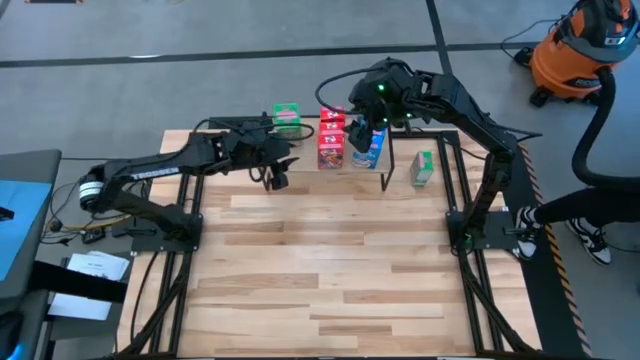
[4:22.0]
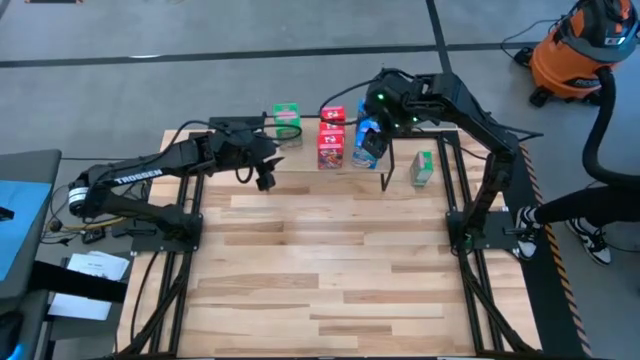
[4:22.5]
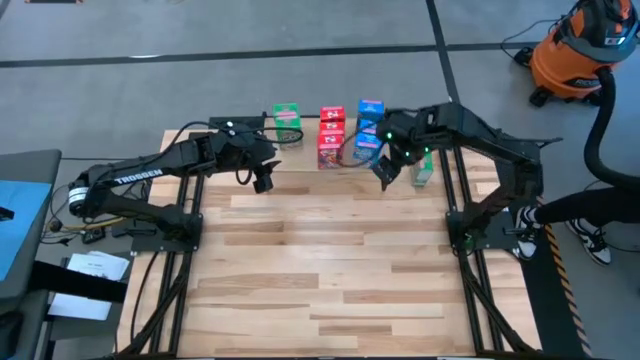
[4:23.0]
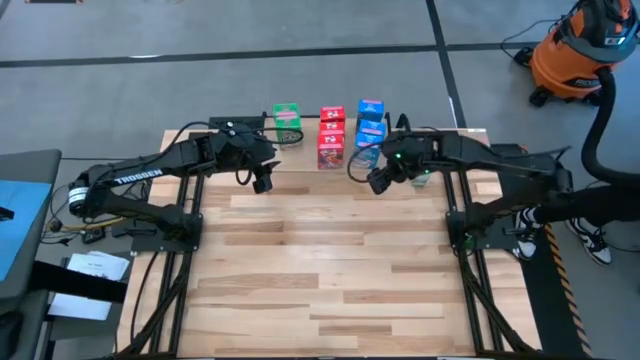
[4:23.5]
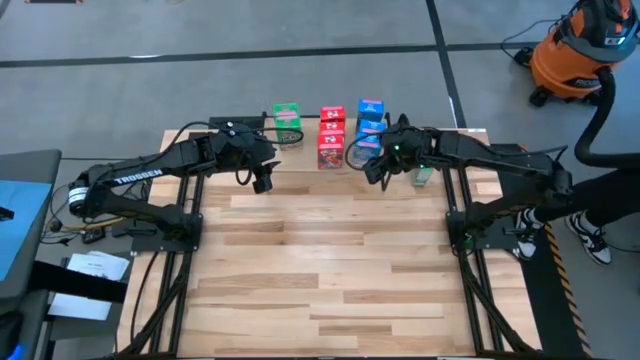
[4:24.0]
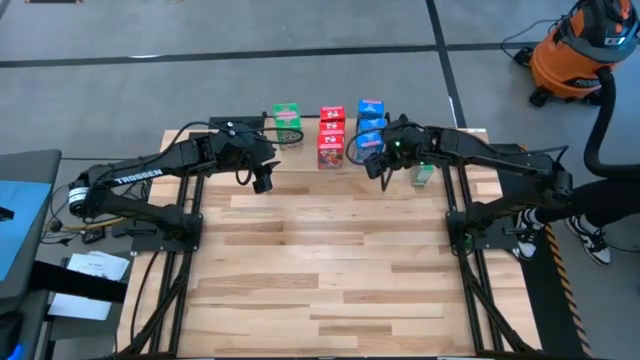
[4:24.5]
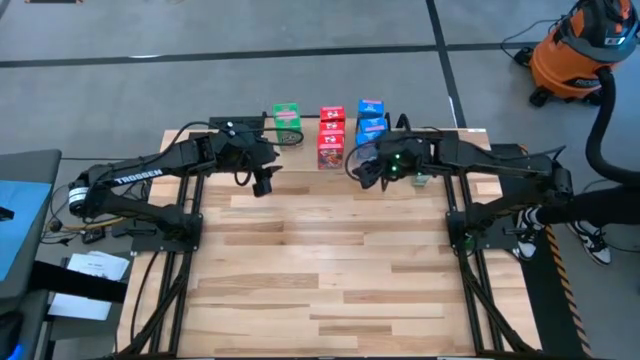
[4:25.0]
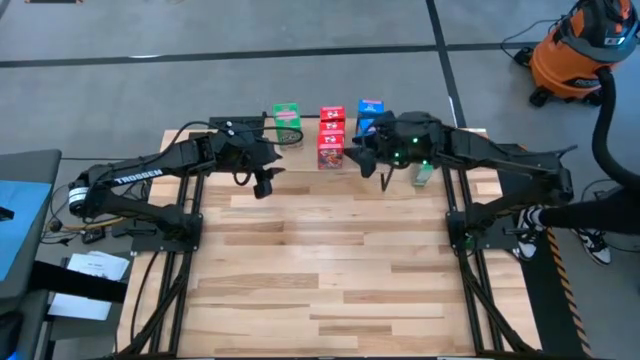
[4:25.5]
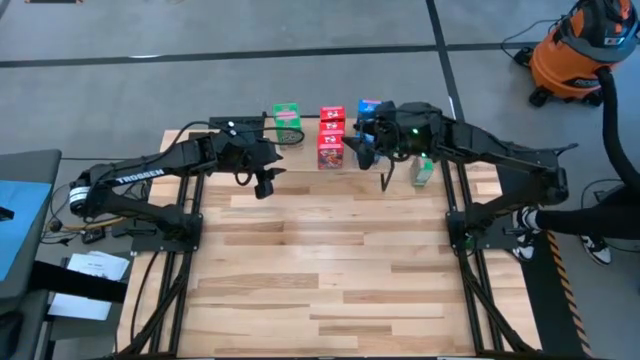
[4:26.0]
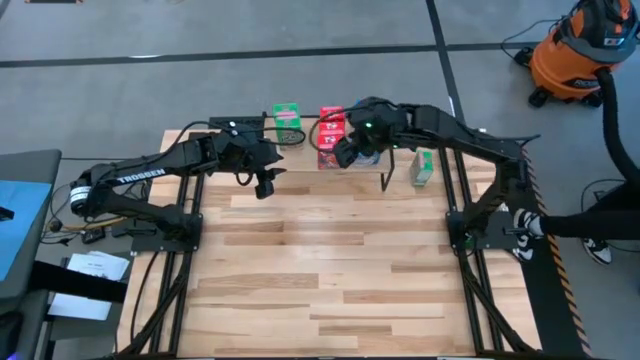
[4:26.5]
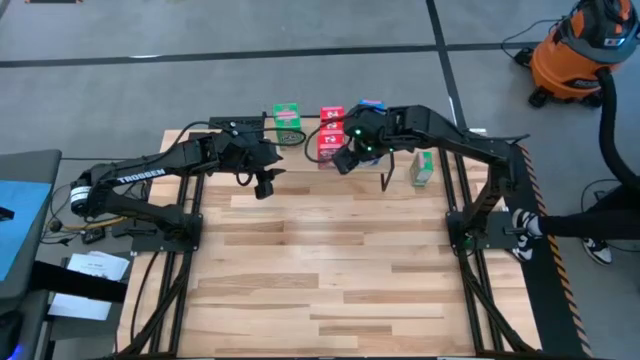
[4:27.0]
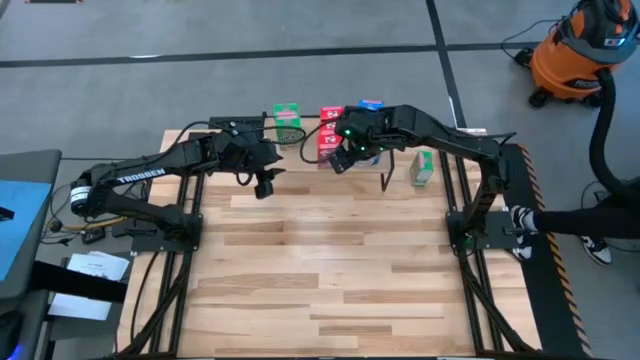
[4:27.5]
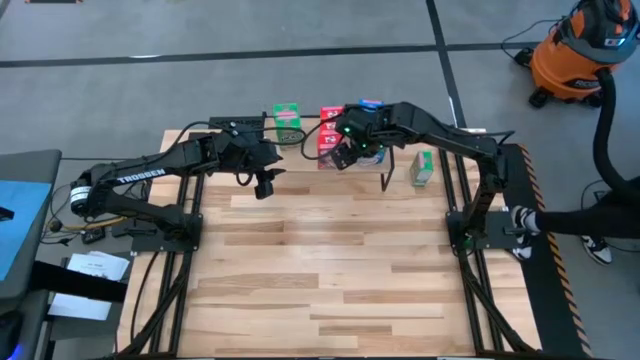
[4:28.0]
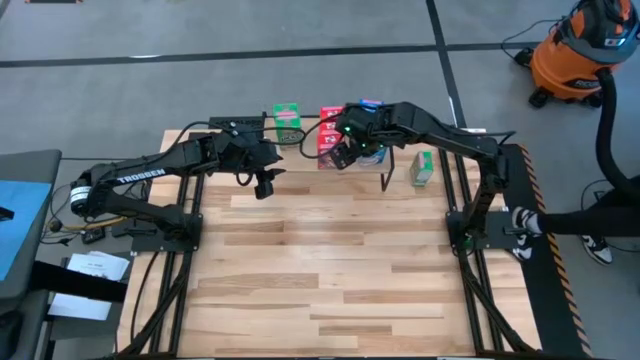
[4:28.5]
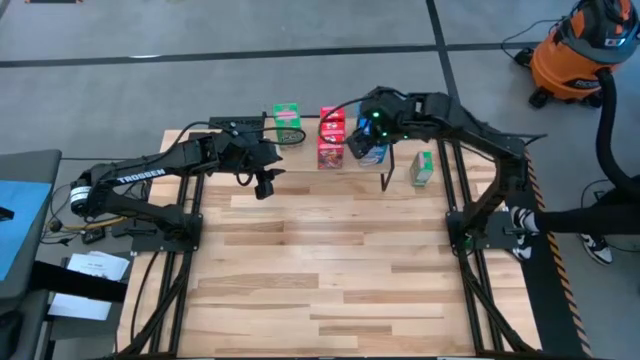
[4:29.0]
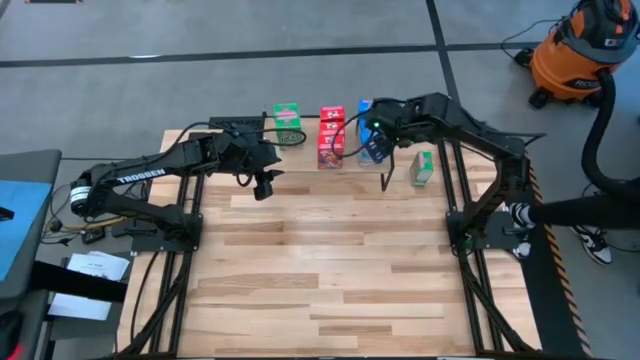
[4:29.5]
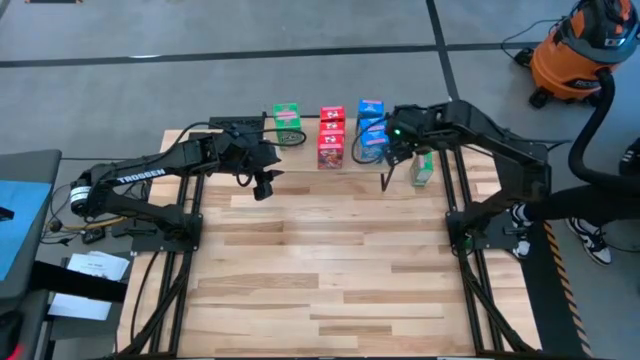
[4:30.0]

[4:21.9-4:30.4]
Task: Stack cereal on shelf
Adjust the blue cereal box on the shelf

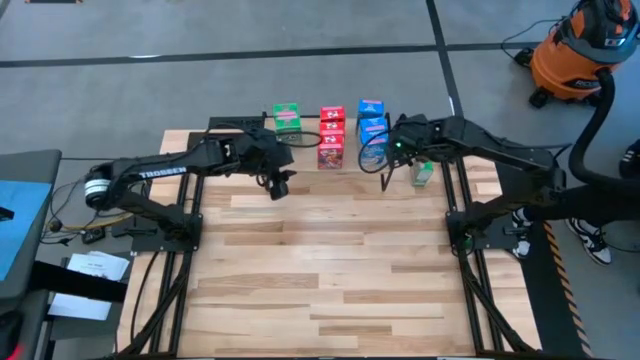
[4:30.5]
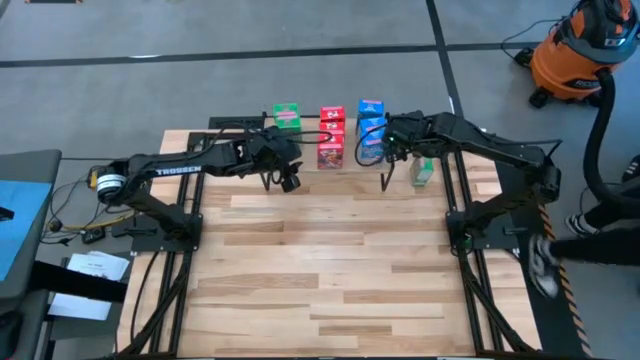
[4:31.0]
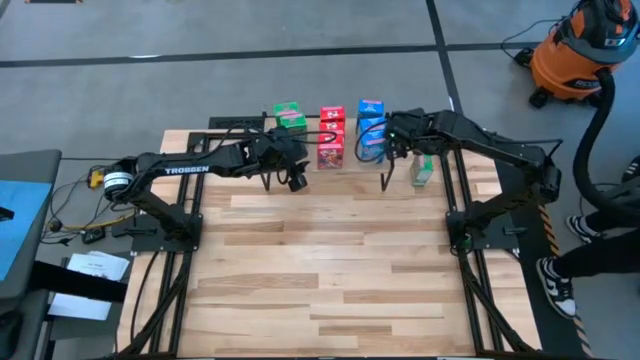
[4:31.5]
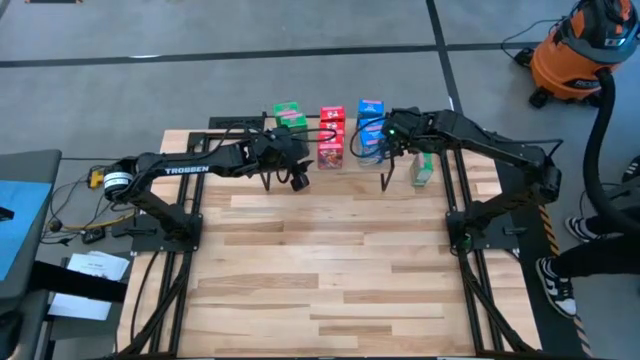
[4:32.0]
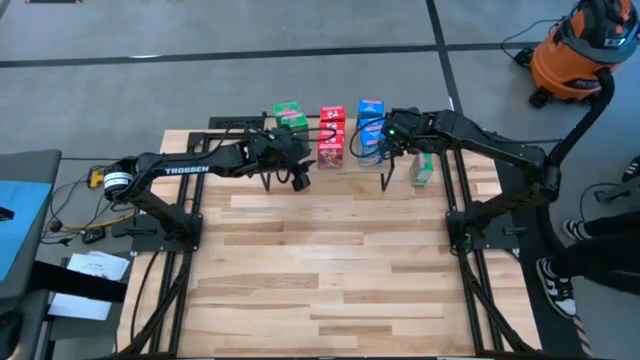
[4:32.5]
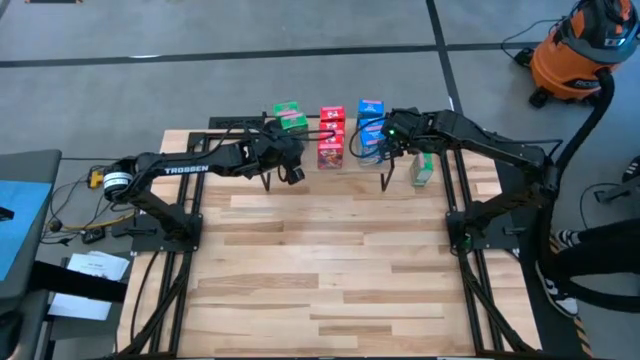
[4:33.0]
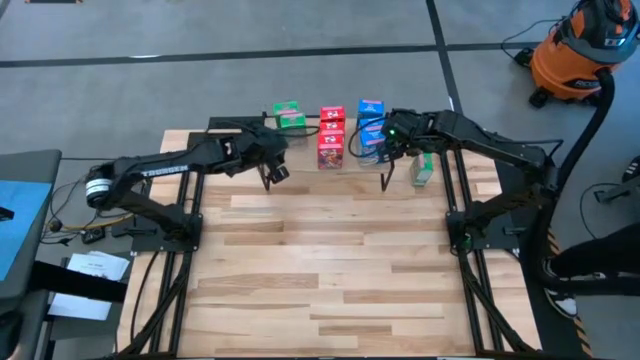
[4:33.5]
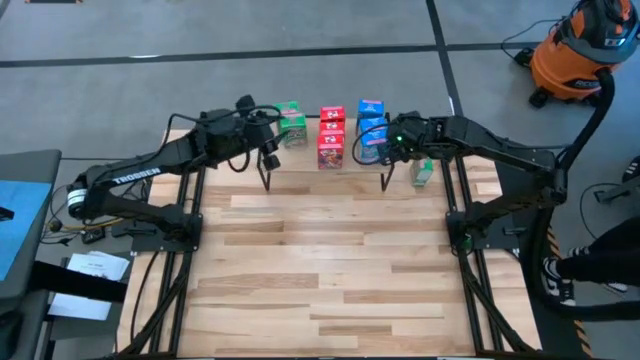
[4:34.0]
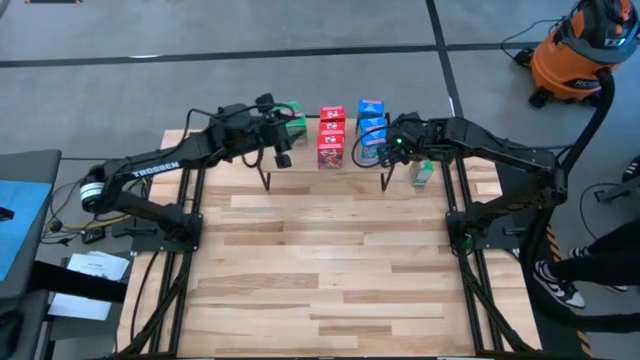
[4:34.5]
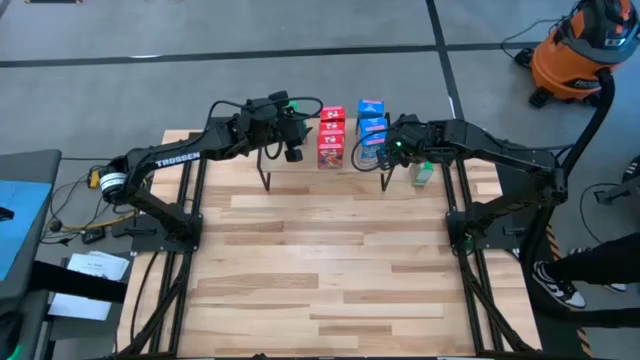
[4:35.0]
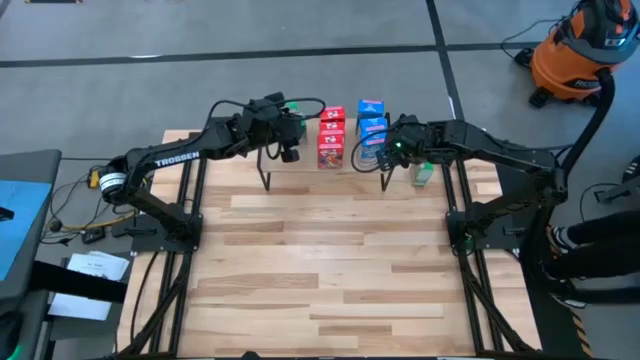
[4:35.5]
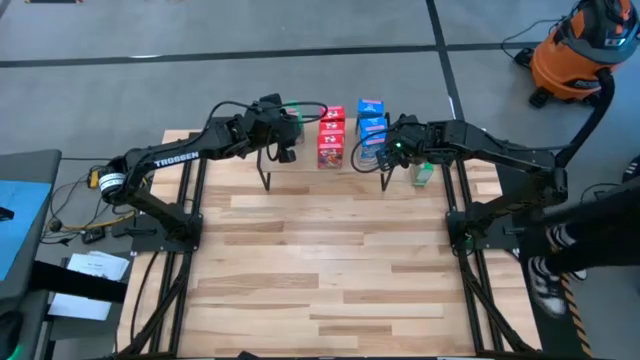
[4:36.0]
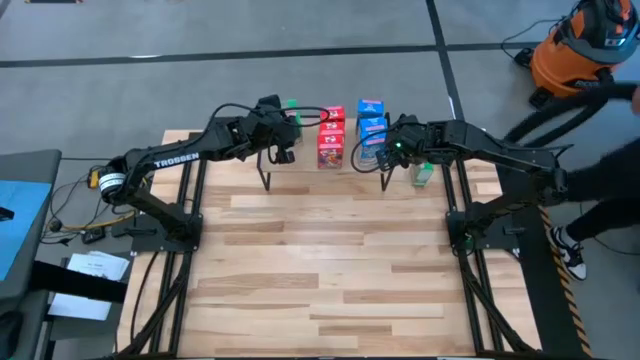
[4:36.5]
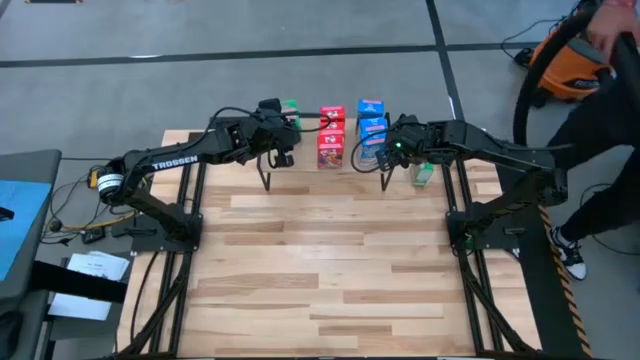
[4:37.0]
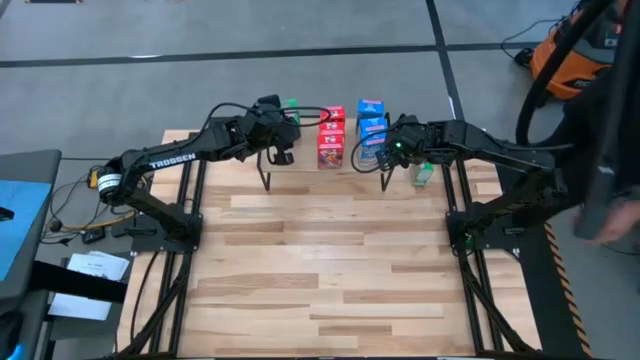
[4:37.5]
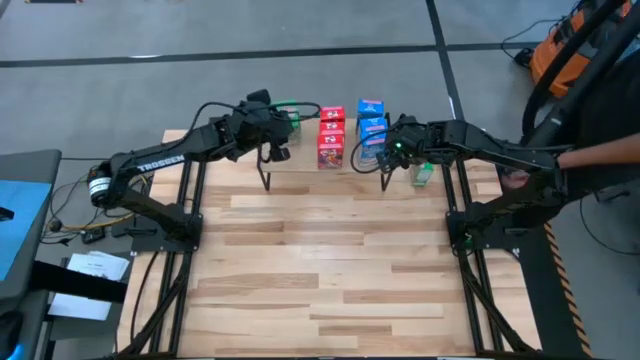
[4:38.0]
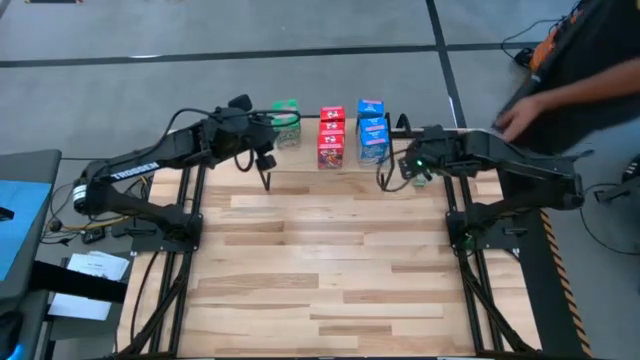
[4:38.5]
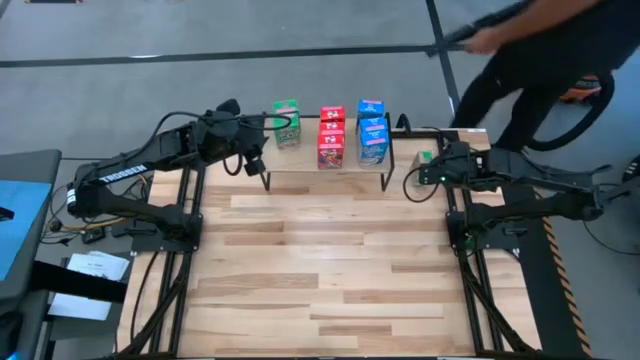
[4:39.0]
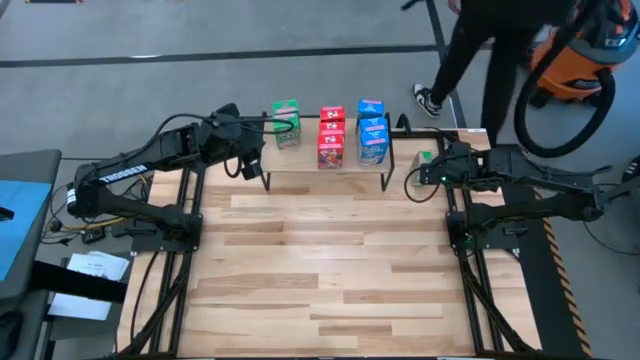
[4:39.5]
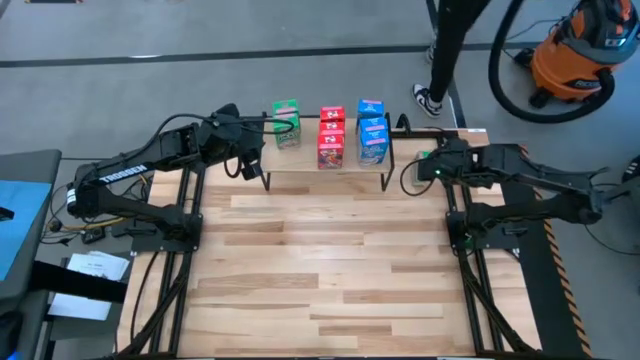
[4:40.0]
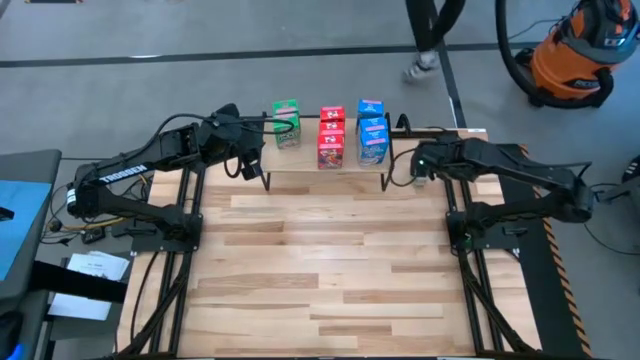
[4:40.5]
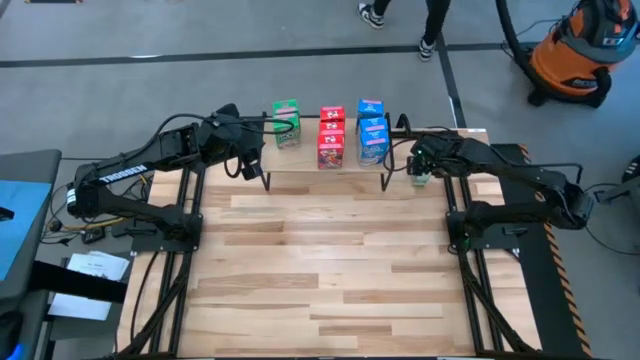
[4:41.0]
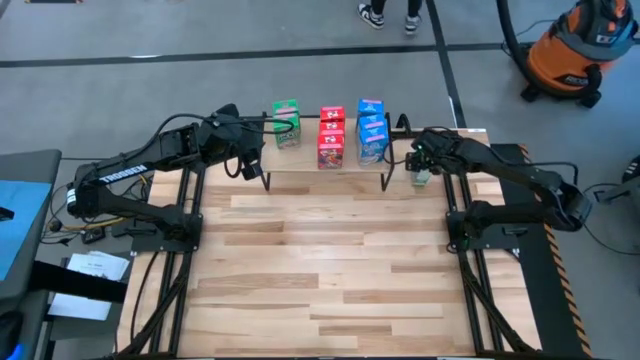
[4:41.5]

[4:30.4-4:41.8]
Adjust the green cereal box on the shelf
